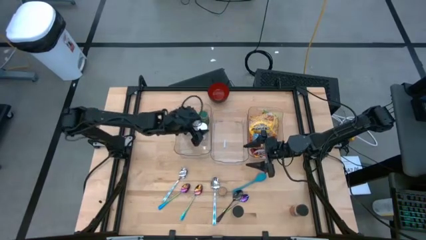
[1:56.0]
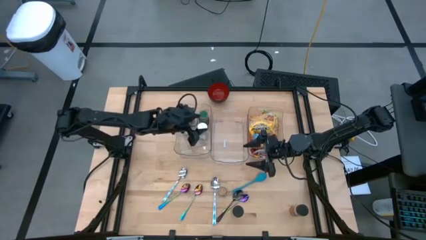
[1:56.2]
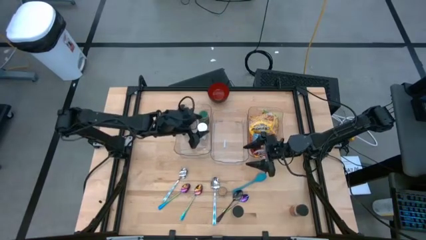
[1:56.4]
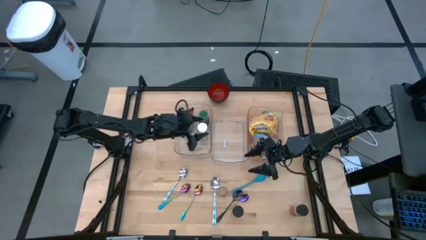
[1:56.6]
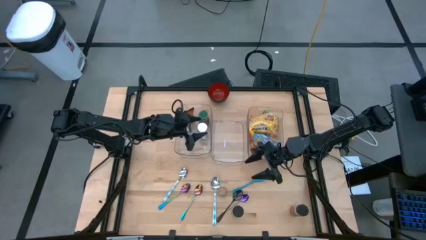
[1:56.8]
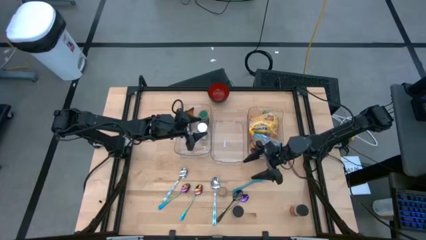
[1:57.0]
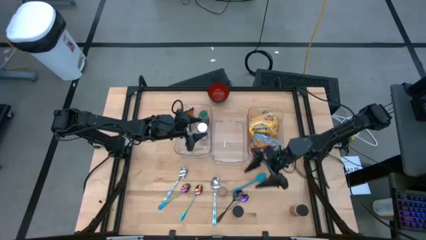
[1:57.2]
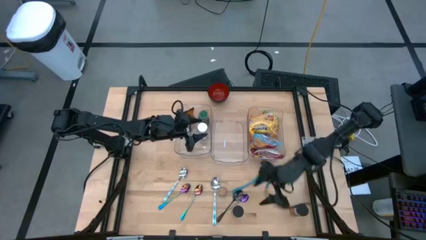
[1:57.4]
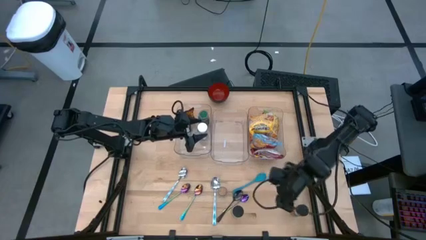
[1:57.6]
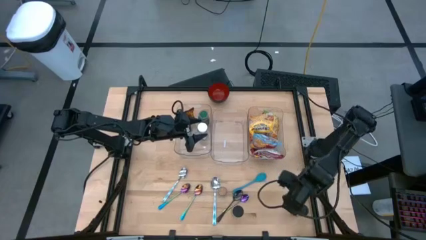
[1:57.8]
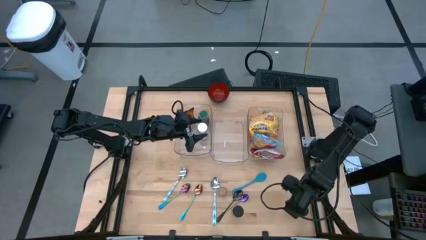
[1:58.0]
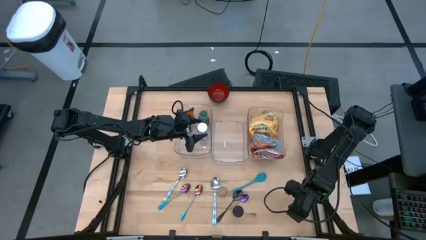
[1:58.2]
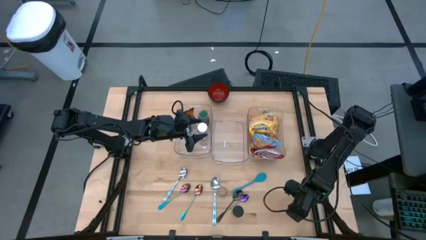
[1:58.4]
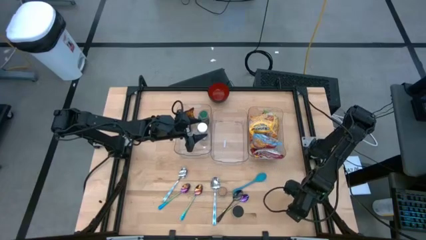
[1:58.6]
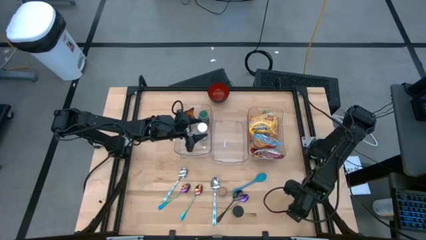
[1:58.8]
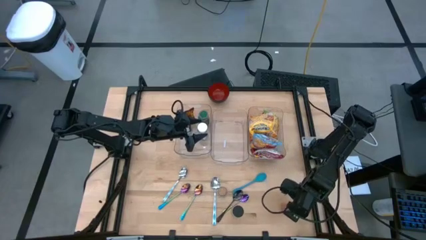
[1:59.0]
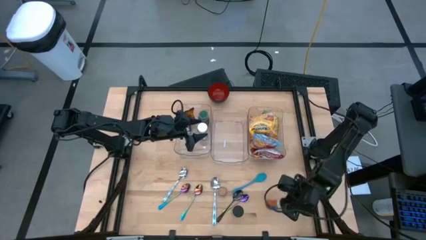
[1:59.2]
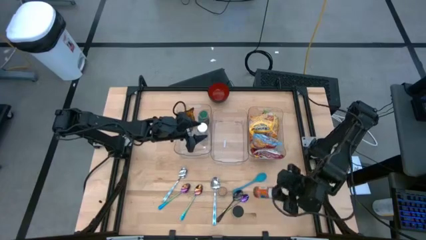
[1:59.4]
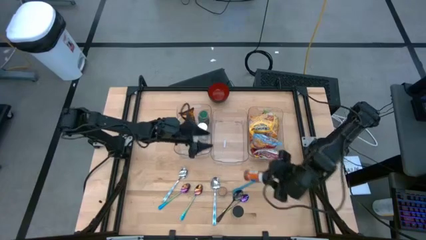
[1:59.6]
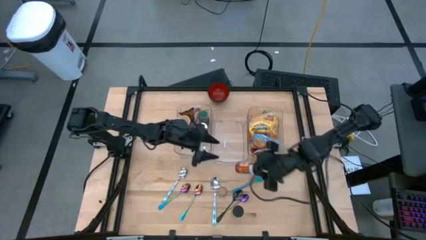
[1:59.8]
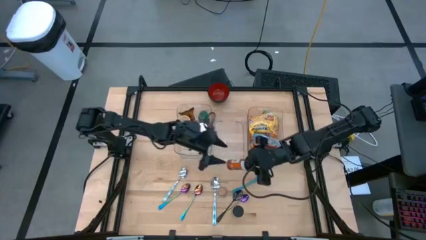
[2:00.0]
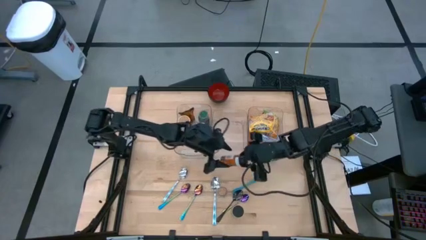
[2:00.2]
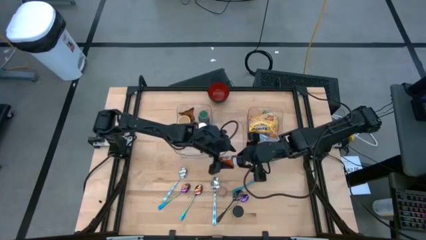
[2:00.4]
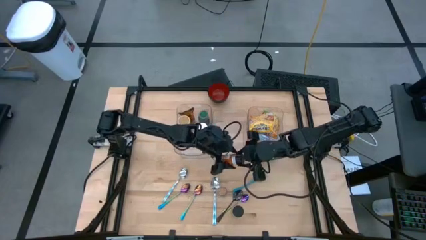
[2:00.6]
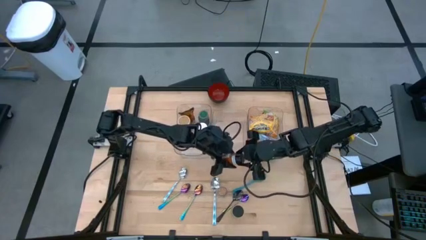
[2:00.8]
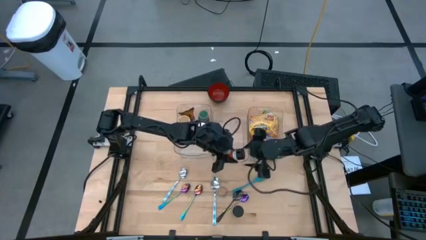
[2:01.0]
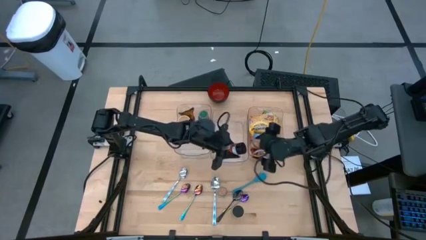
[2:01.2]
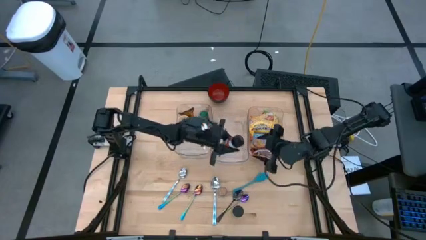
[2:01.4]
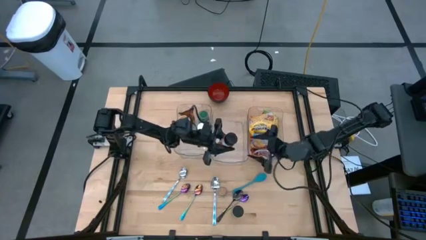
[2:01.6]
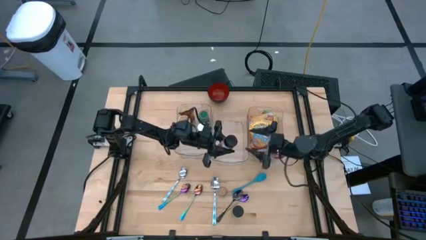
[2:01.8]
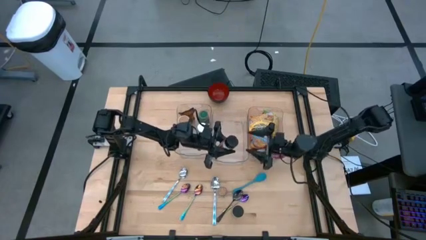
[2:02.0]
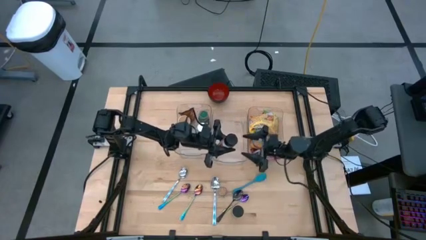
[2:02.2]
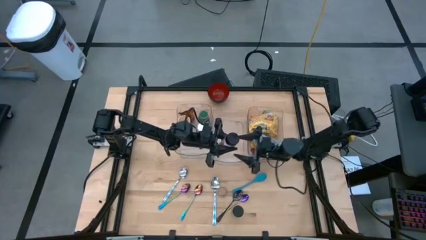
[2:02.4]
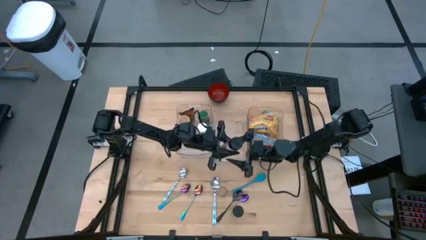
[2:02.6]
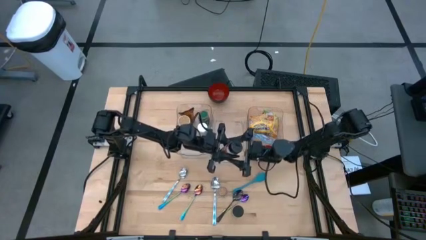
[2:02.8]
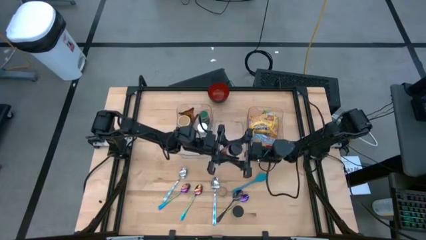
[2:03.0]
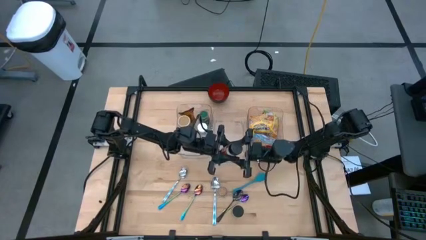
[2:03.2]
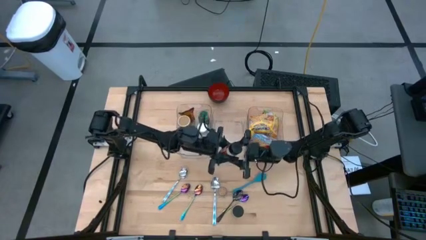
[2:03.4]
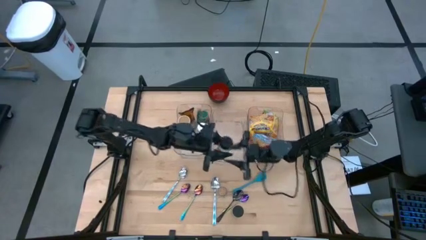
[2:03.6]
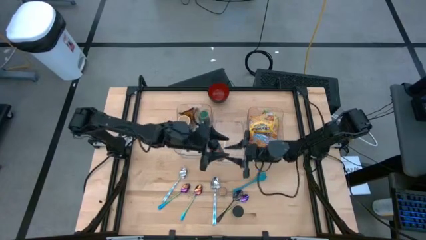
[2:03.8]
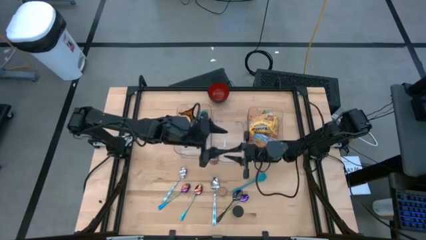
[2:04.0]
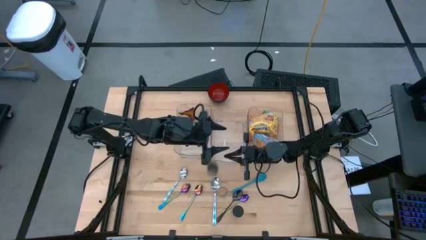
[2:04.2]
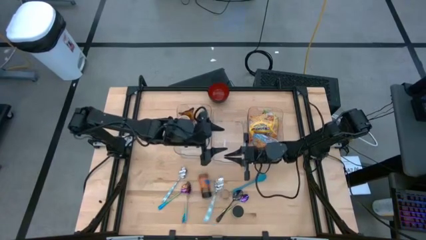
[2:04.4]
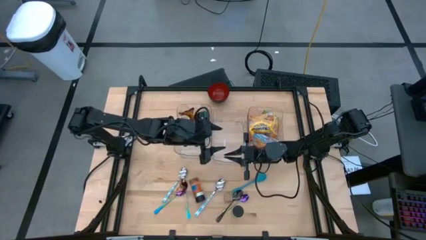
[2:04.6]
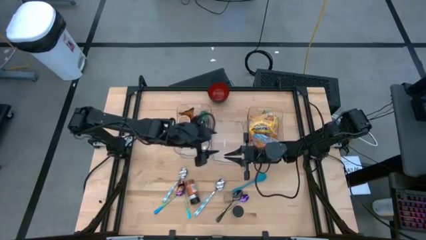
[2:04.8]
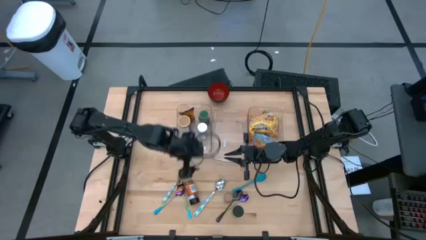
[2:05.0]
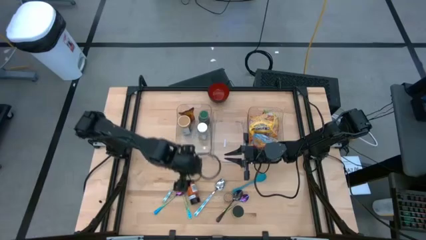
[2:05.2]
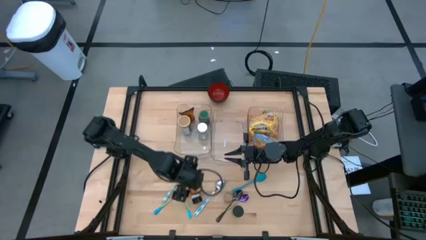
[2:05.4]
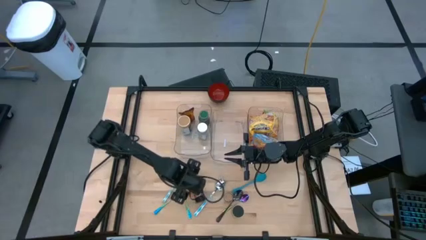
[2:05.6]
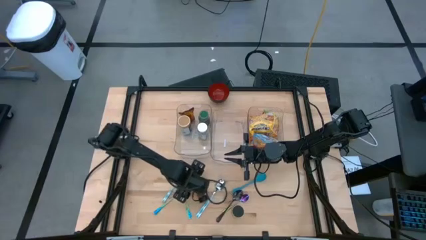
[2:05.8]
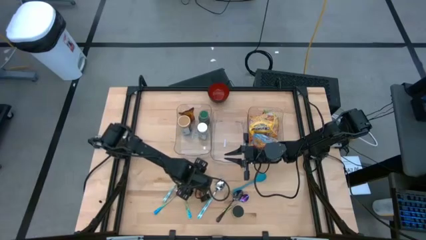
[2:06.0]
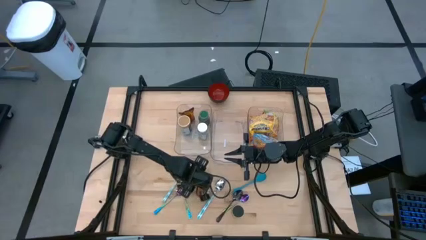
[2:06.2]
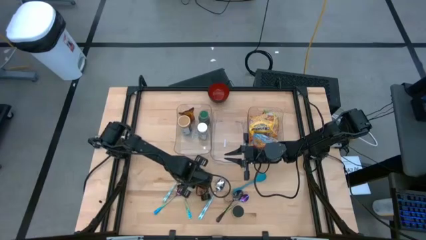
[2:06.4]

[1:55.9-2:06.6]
Task: Pick & Place Food Item
Put the orange seasoning bottle into the left transparent bin
